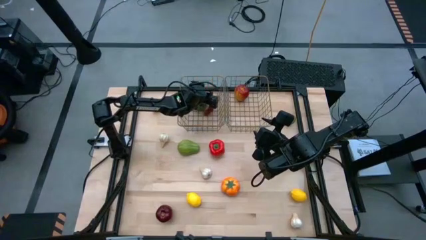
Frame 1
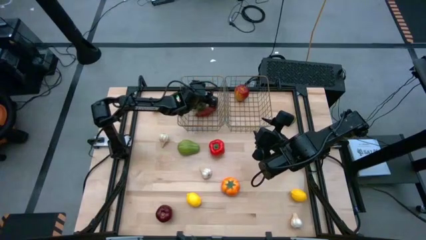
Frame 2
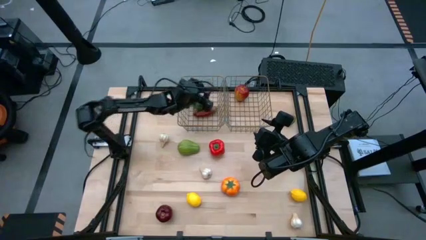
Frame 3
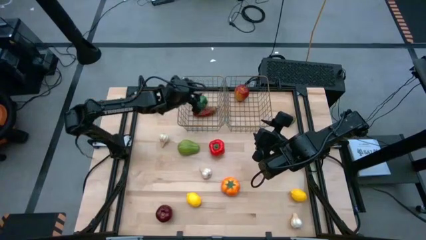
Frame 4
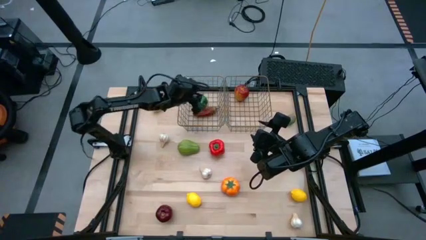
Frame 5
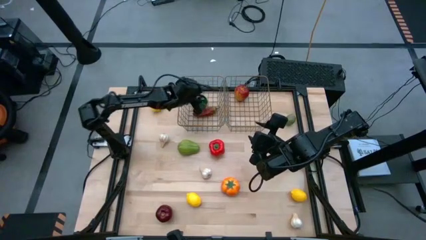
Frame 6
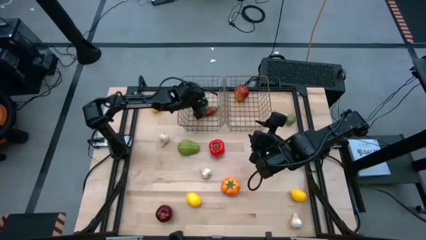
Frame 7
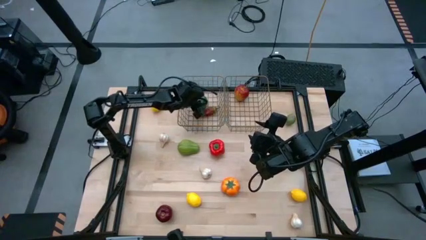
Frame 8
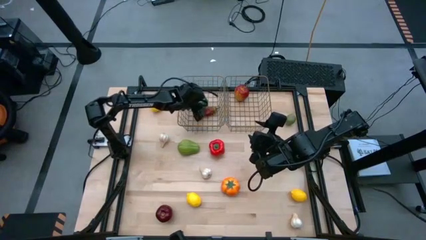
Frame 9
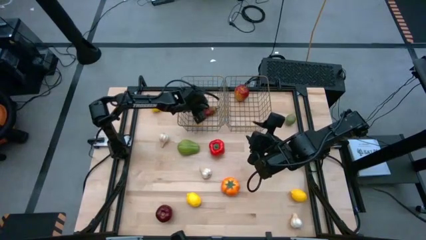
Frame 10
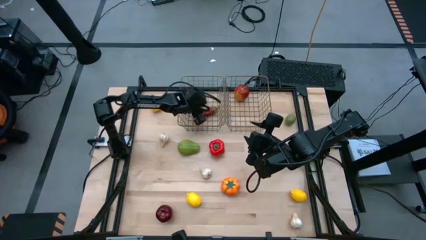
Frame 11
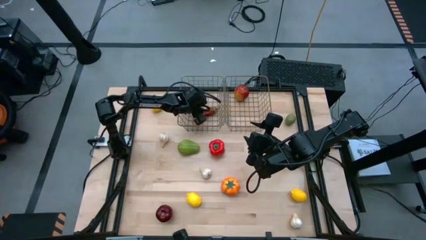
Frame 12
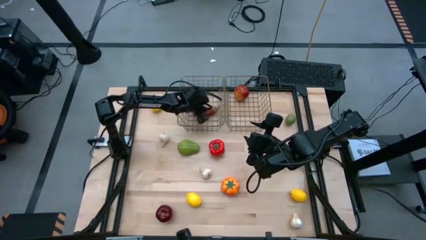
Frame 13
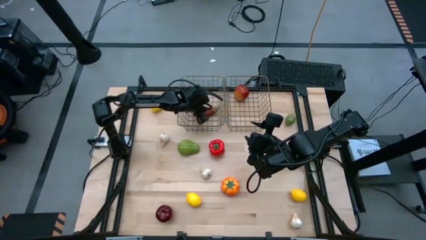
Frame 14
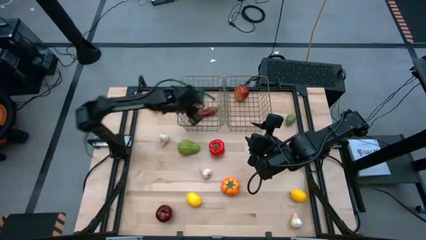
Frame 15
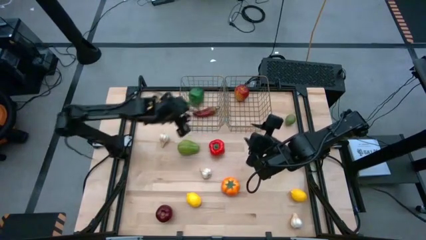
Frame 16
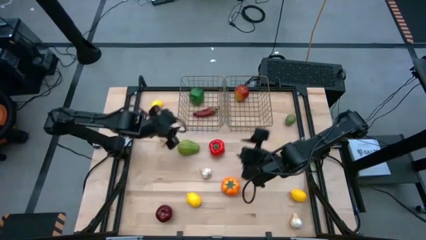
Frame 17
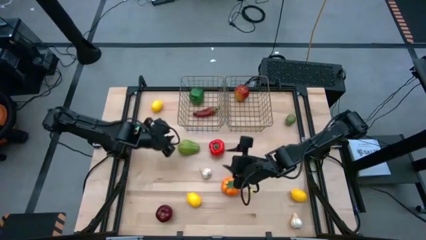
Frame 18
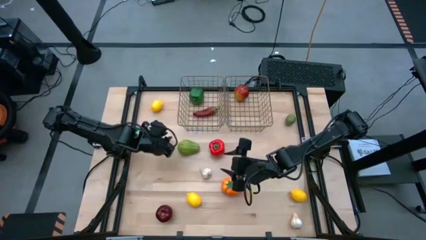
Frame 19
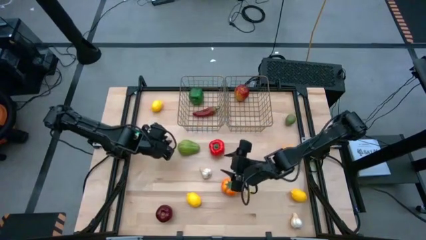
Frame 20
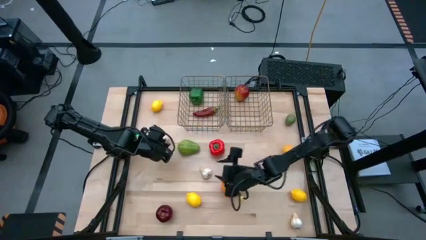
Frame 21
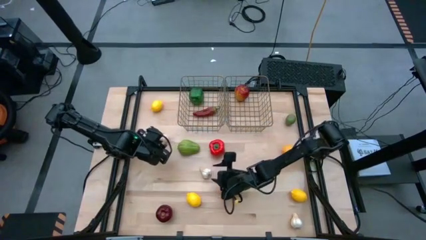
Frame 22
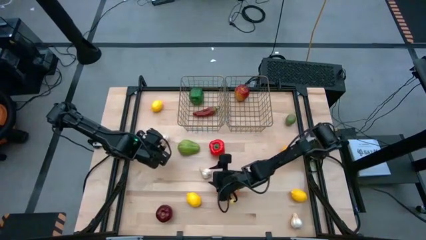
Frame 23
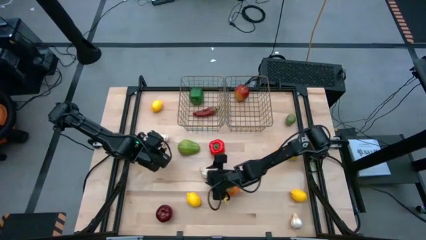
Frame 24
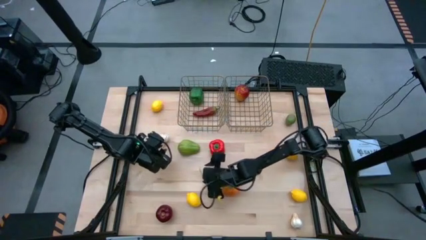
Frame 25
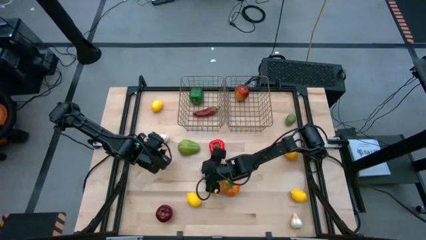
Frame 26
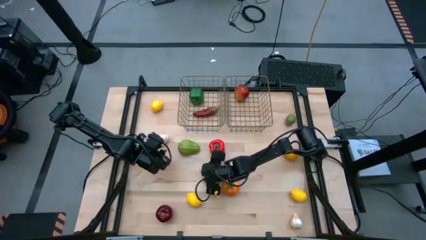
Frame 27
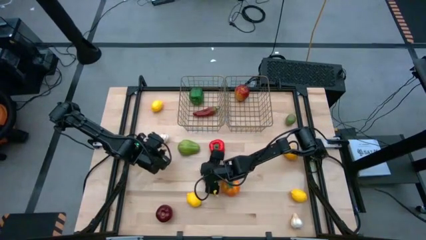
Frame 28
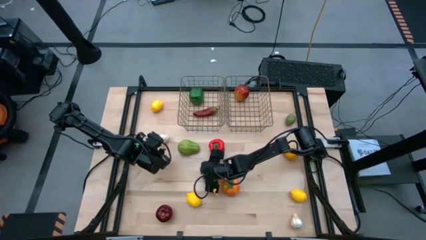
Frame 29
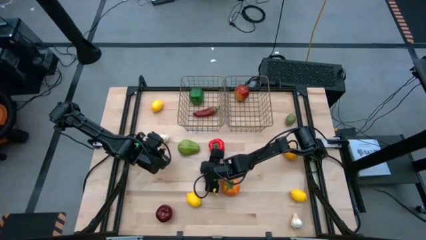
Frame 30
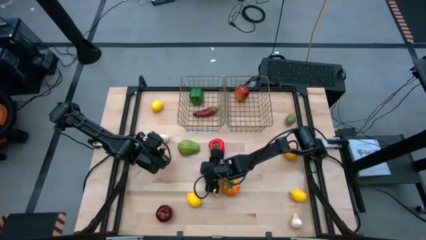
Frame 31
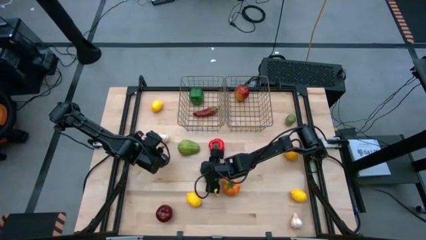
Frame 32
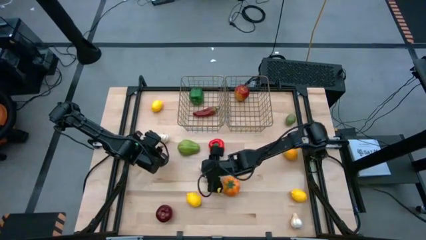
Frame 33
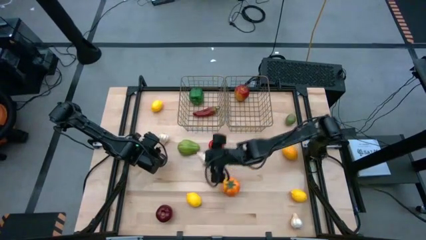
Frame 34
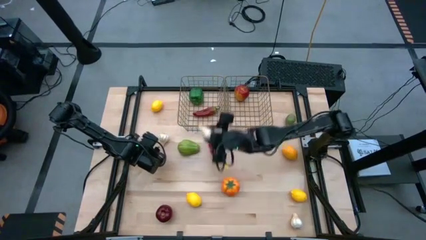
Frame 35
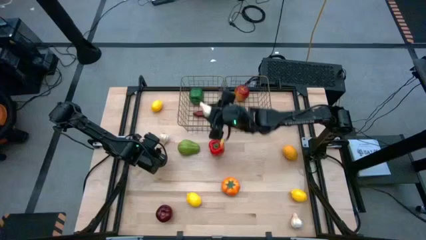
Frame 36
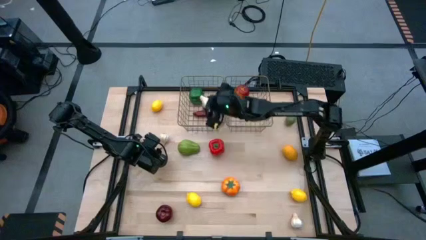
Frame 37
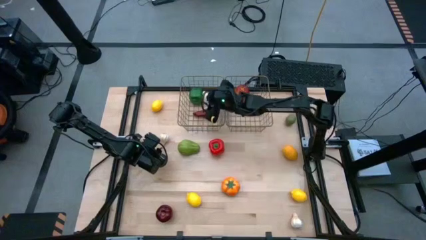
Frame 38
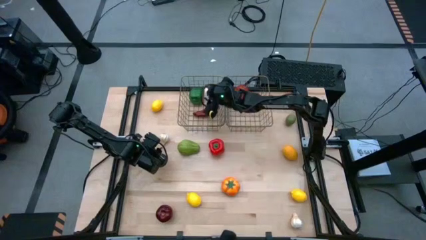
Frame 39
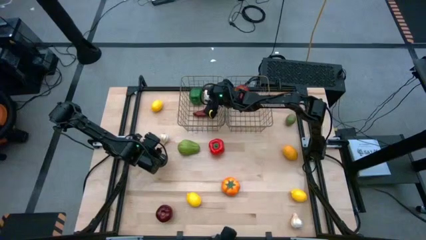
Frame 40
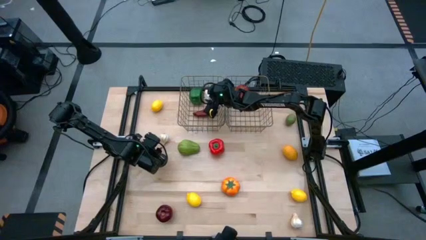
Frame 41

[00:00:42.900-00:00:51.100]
Task: Sort produce into baskets
Put the middle garlic into the left mesh basket

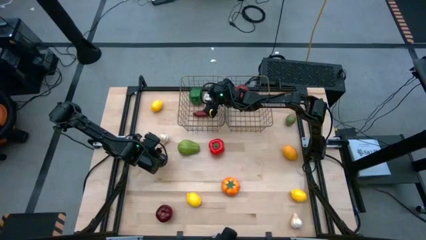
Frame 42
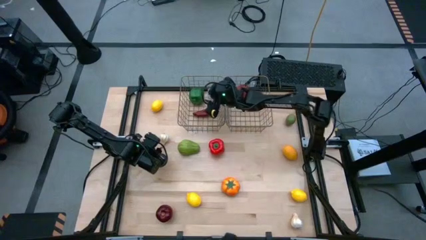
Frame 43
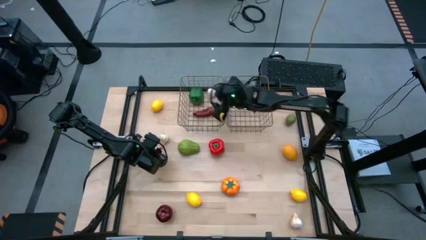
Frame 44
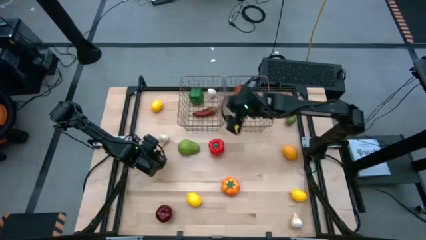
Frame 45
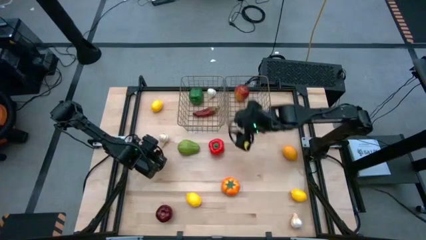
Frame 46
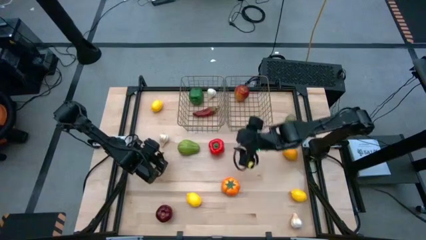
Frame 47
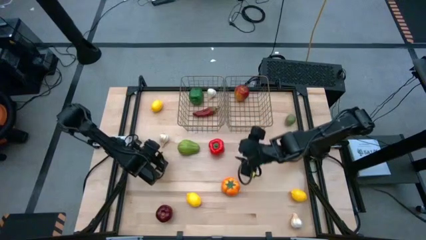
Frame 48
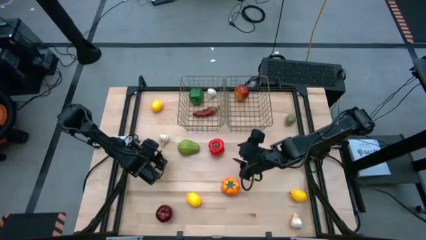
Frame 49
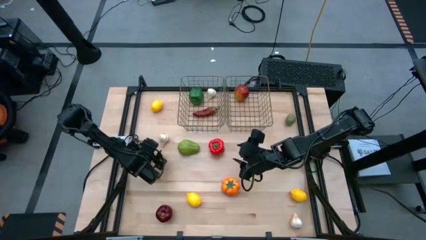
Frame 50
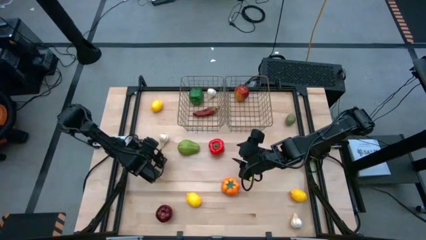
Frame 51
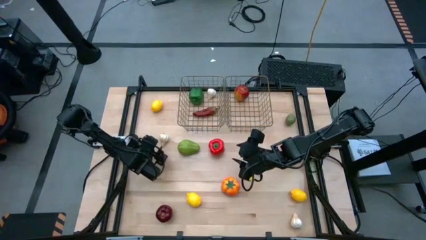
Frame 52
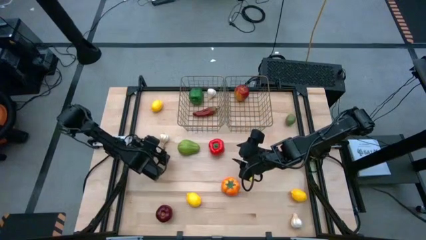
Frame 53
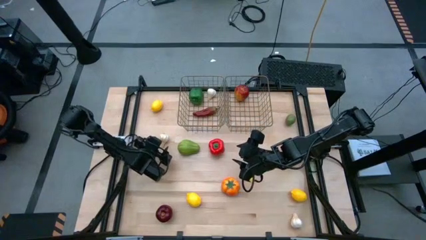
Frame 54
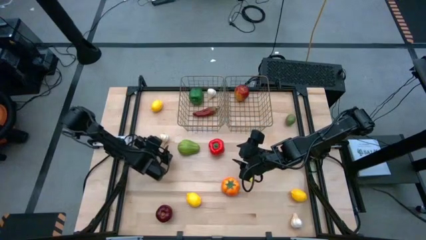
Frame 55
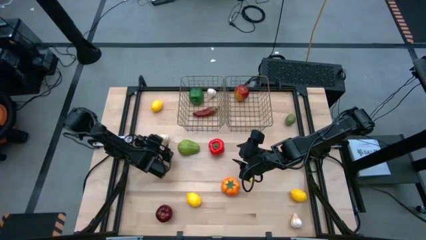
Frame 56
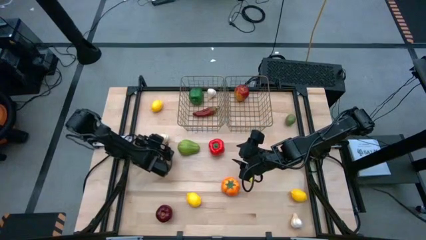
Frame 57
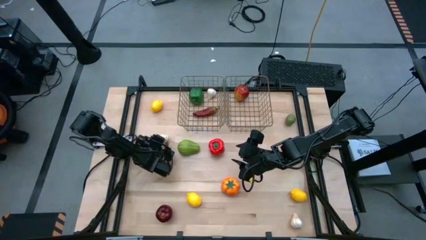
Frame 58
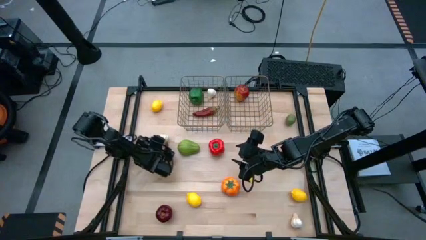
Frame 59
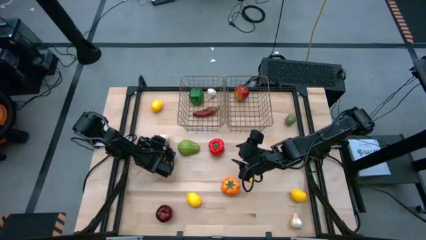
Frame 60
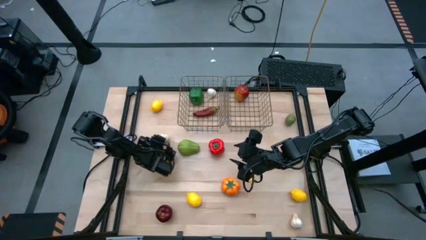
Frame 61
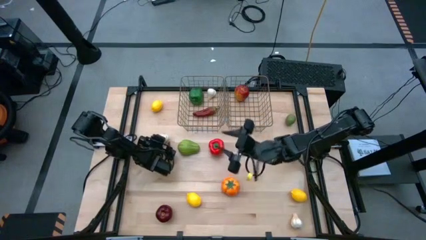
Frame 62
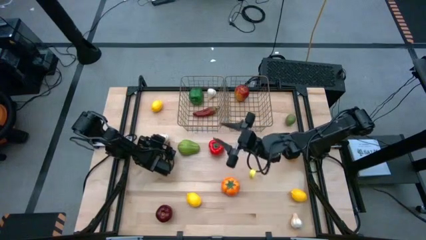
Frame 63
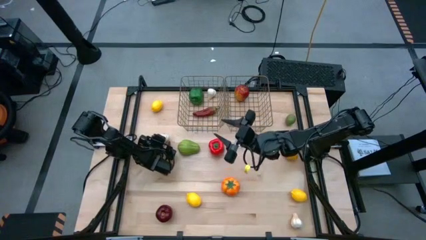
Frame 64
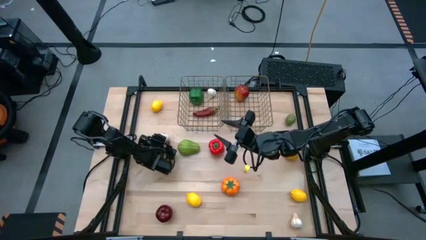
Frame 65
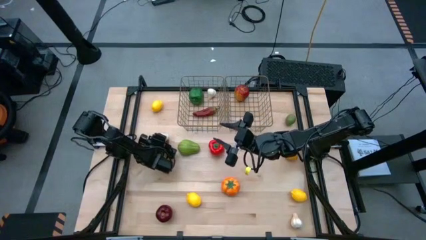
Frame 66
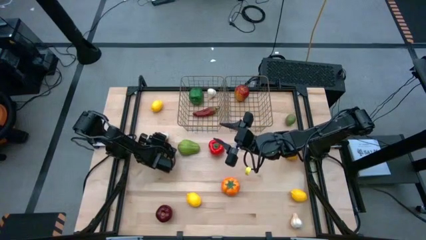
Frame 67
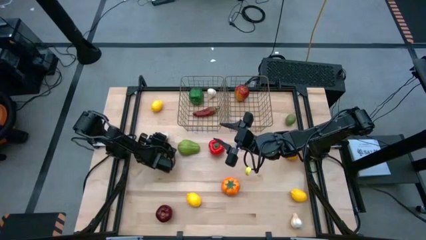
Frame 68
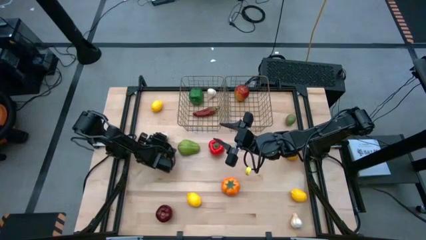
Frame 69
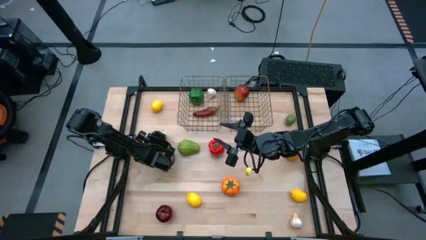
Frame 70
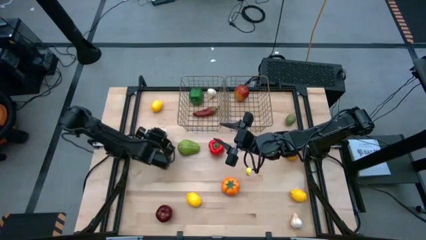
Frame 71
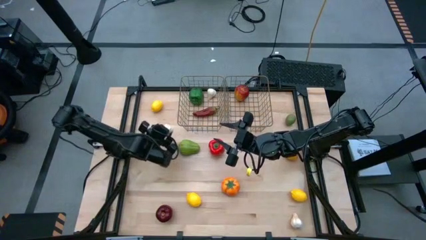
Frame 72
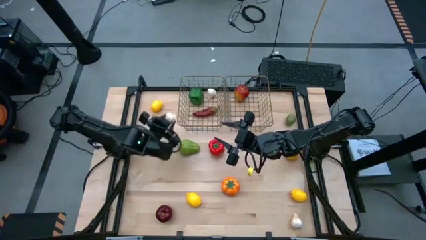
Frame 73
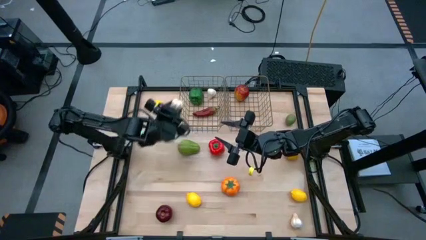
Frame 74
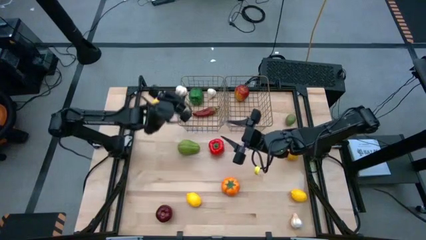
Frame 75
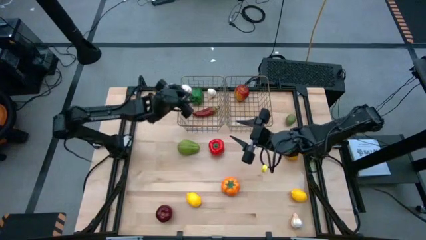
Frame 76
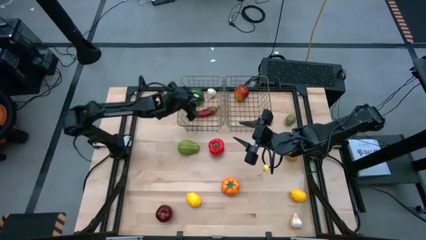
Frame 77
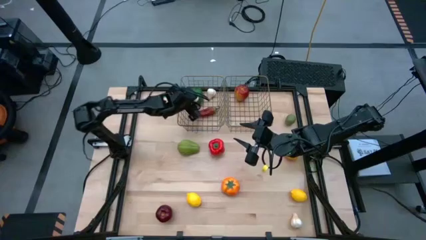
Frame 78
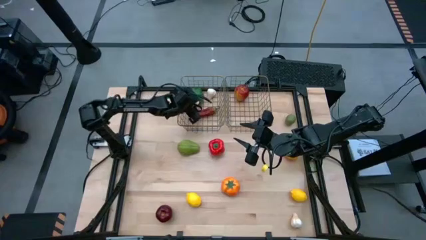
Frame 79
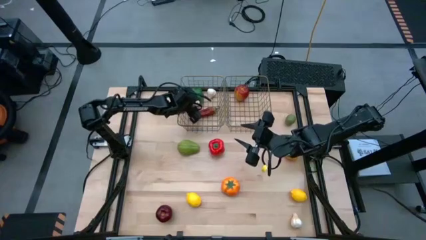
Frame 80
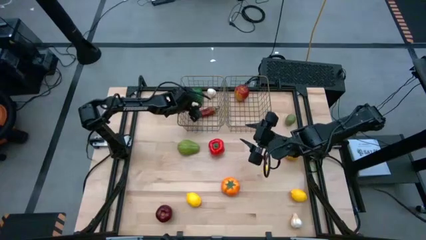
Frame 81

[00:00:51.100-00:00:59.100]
Put the left garlic into the left mesh basket
